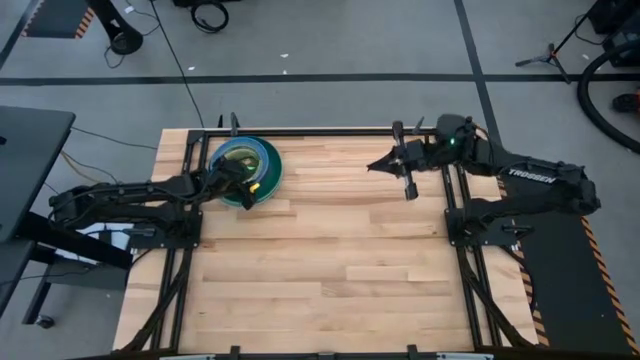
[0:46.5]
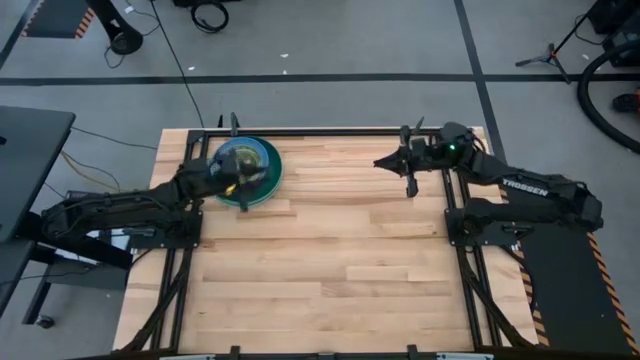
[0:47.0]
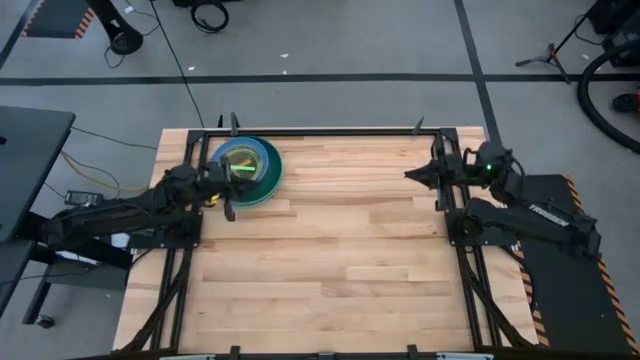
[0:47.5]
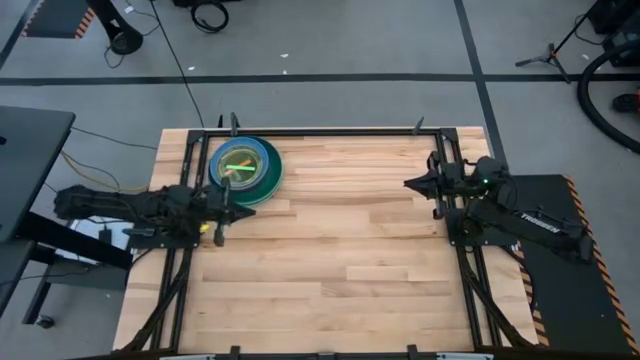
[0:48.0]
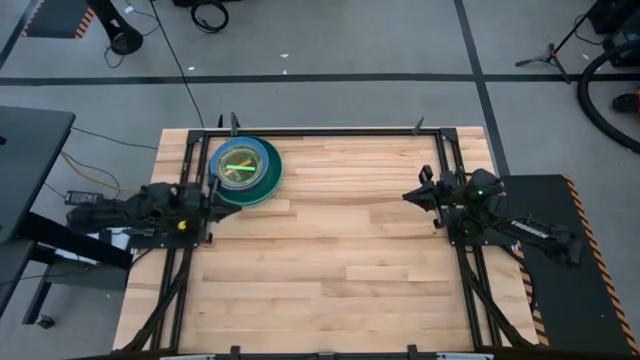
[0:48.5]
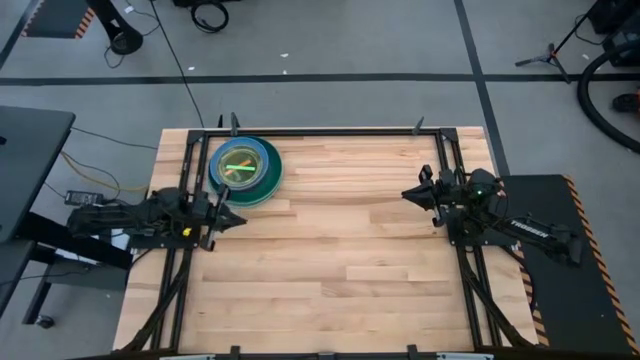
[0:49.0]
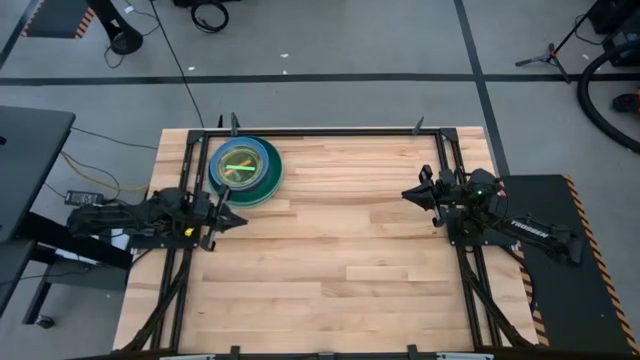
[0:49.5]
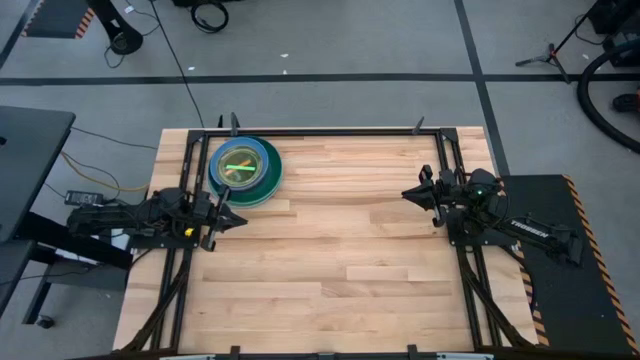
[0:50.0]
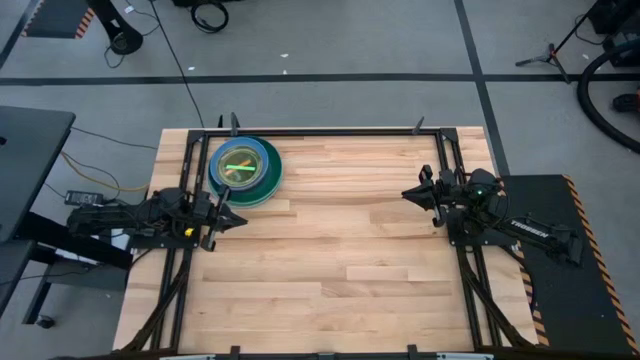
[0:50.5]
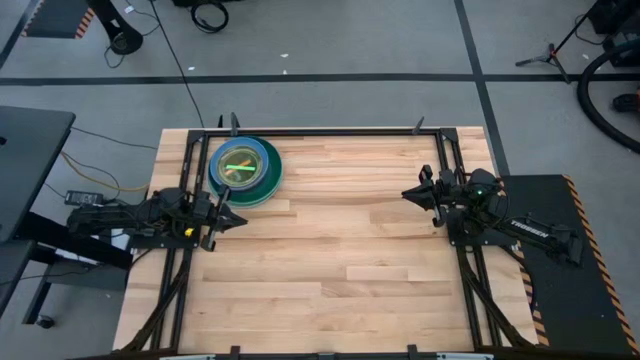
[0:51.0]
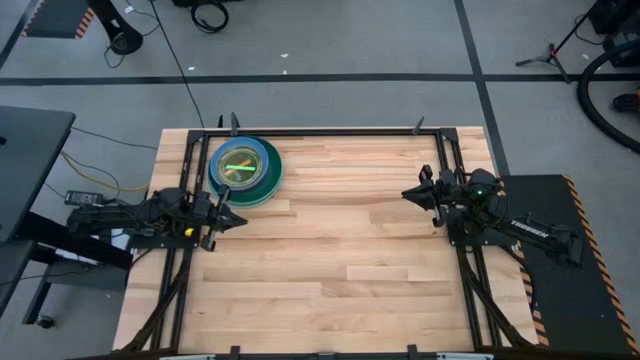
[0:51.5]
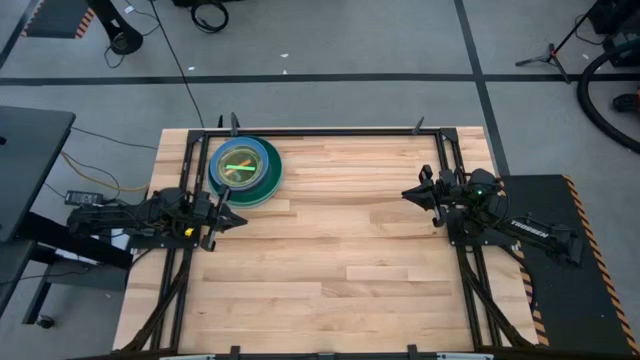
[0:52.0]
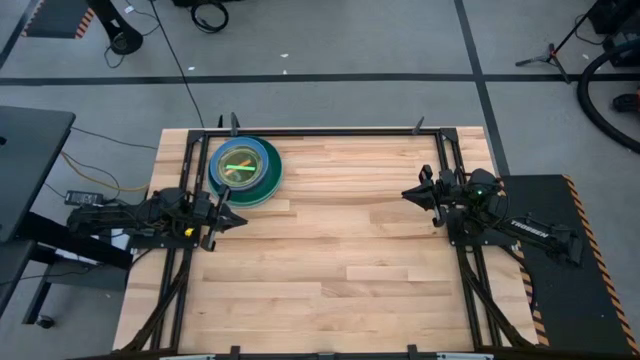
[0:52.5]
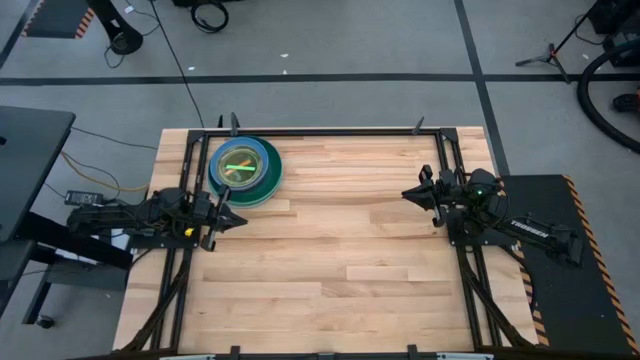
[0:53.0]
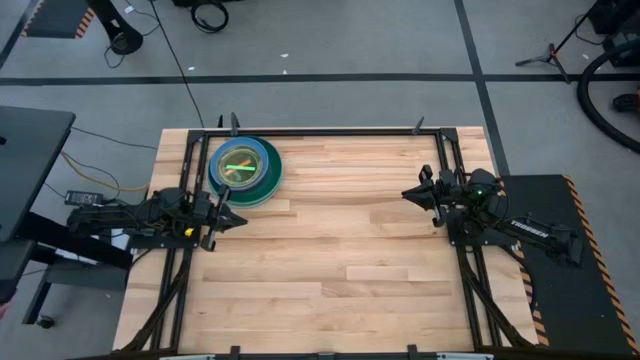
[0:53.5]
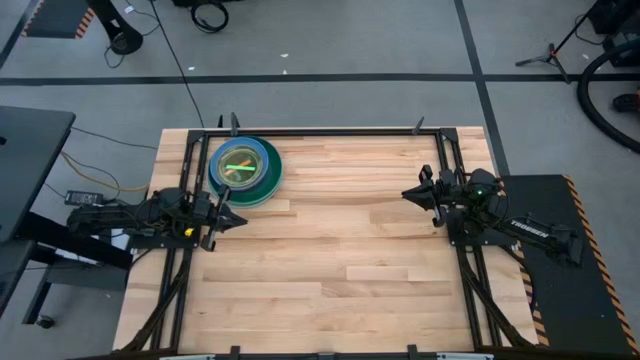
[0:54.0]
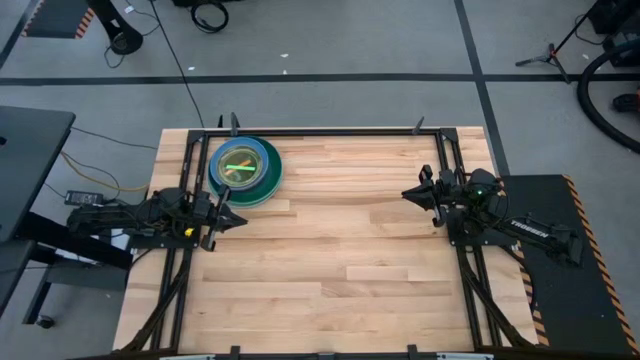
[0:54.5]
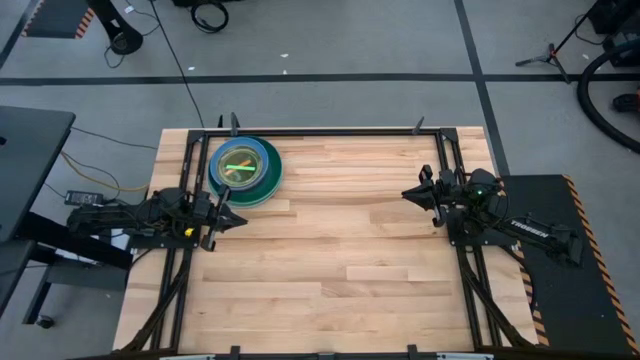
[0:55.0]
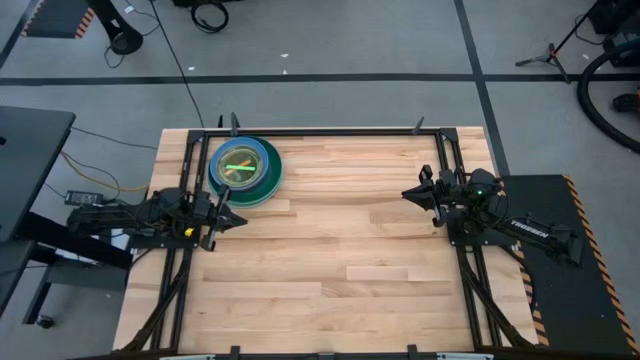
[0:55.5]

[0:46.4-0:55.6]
Task: Stack plastic plates
Return to Home Position

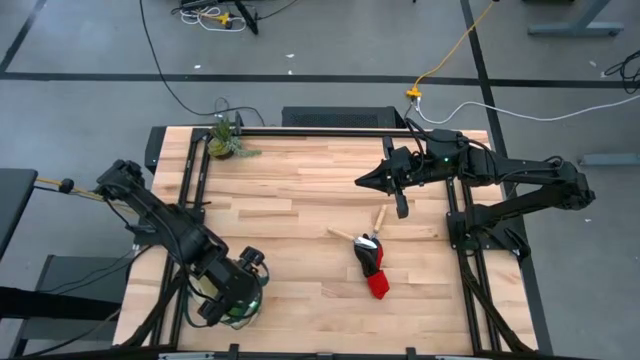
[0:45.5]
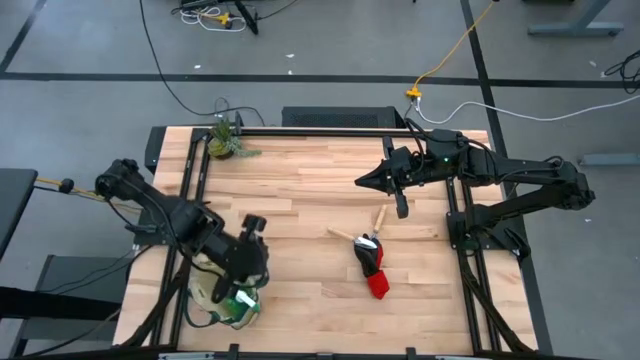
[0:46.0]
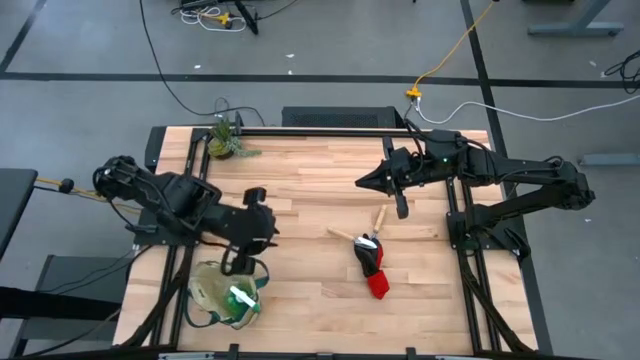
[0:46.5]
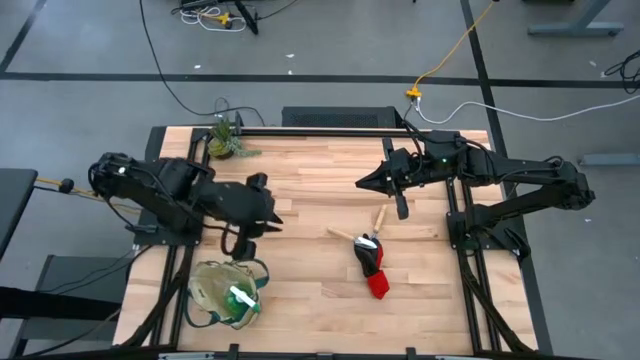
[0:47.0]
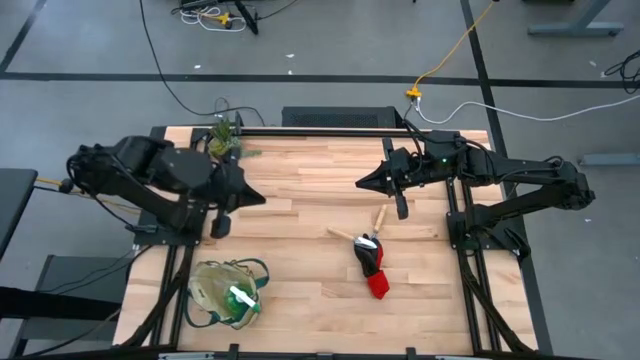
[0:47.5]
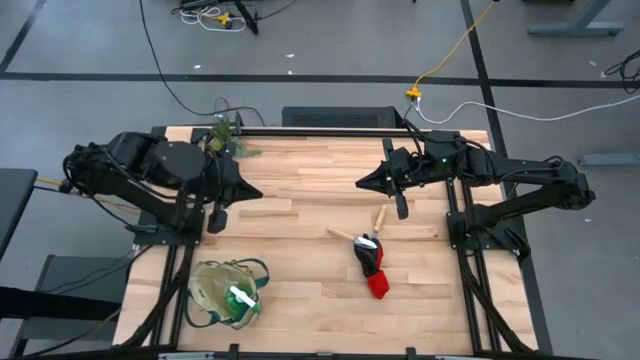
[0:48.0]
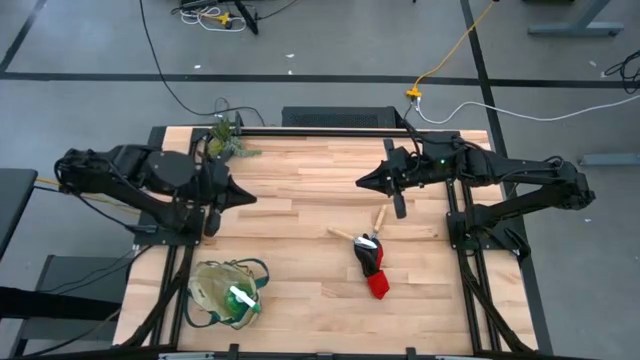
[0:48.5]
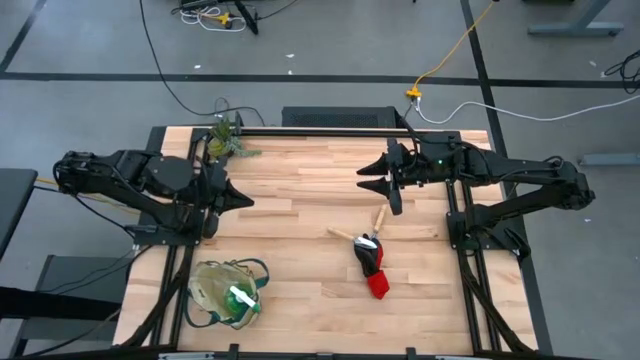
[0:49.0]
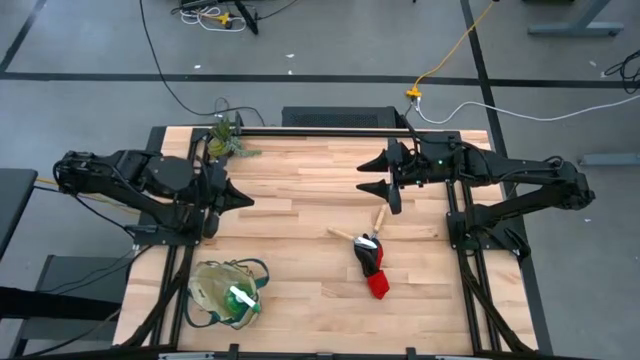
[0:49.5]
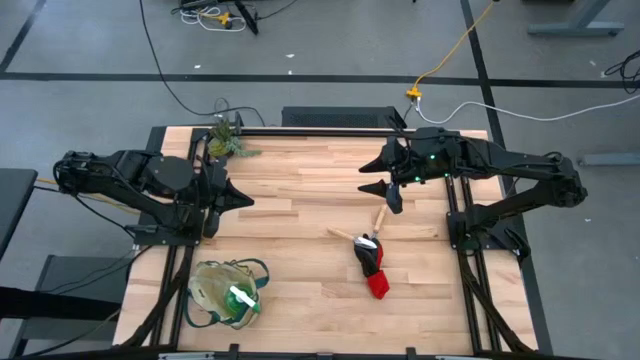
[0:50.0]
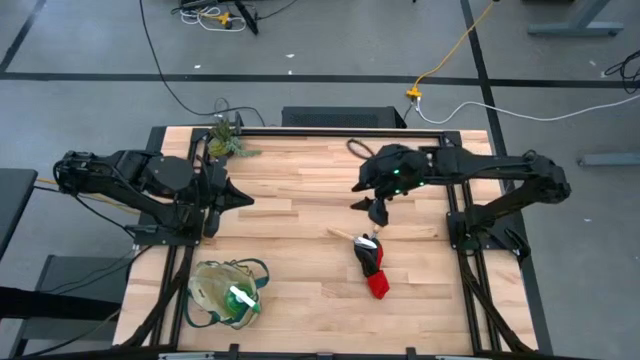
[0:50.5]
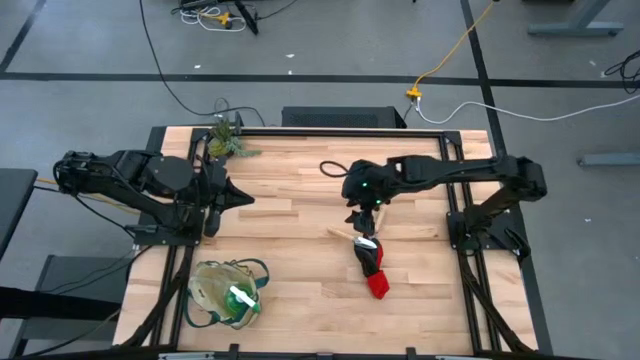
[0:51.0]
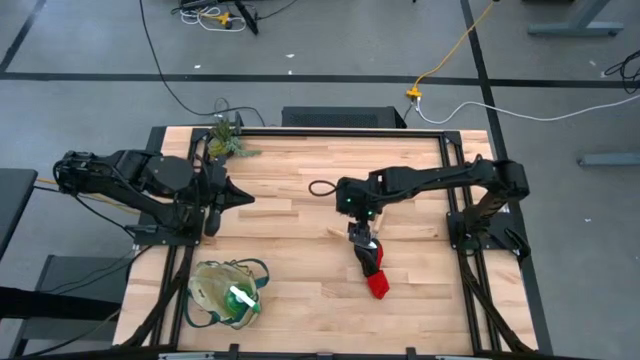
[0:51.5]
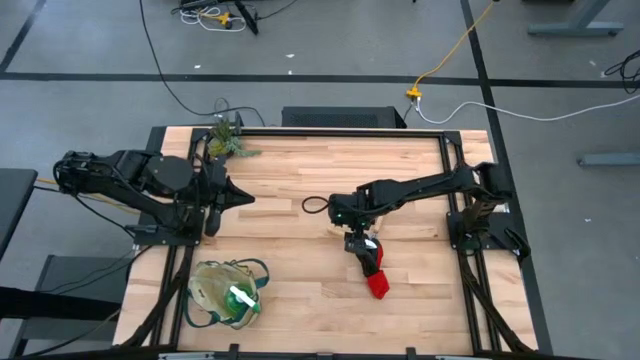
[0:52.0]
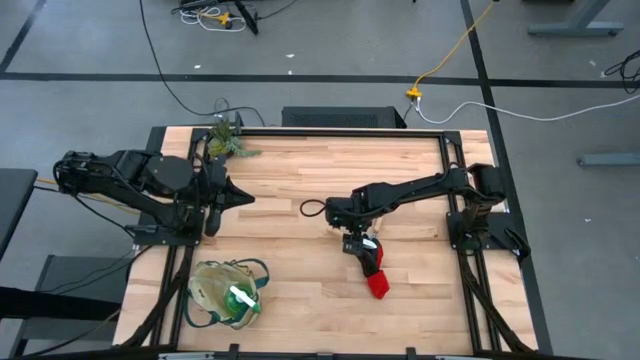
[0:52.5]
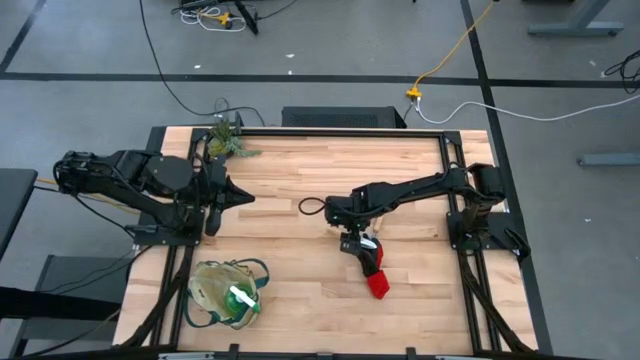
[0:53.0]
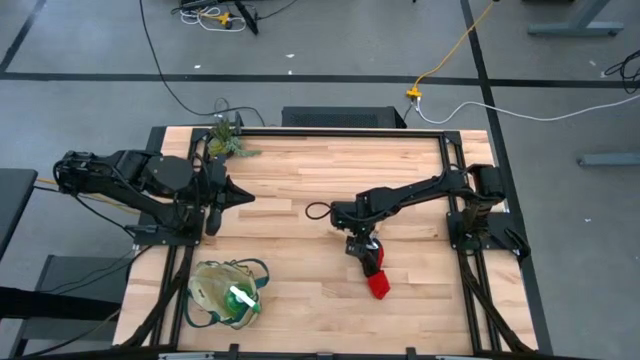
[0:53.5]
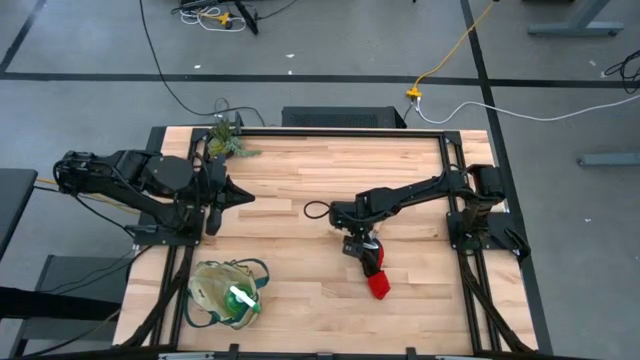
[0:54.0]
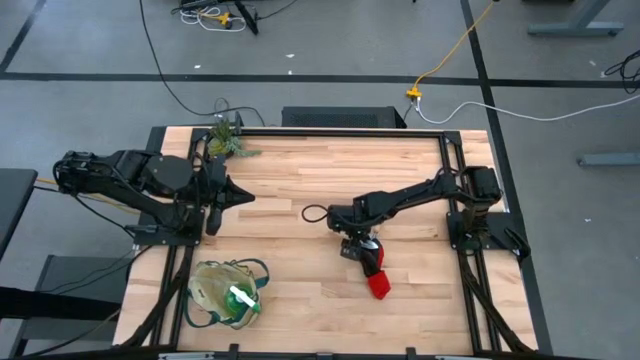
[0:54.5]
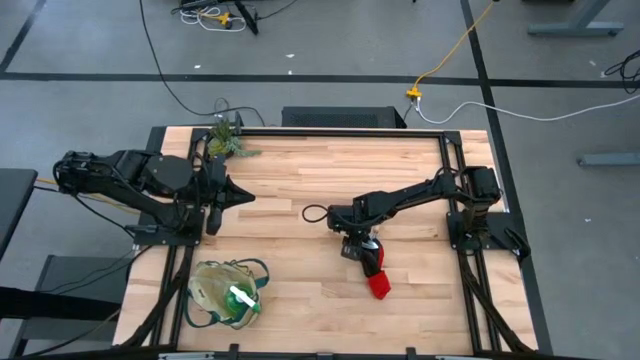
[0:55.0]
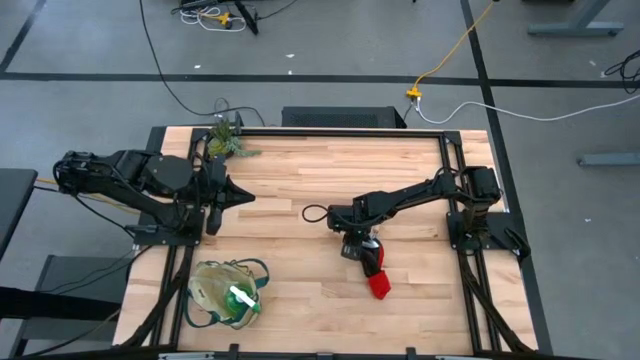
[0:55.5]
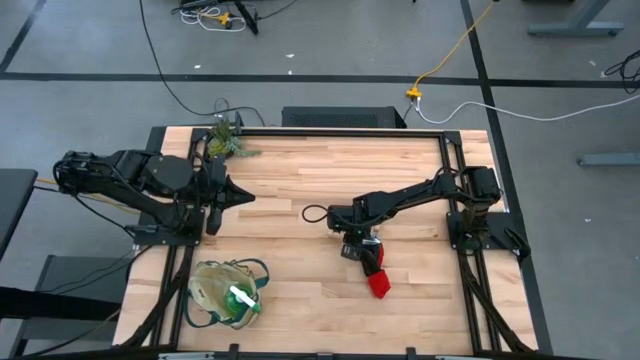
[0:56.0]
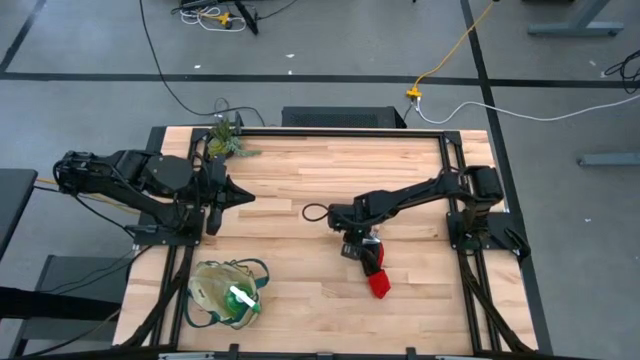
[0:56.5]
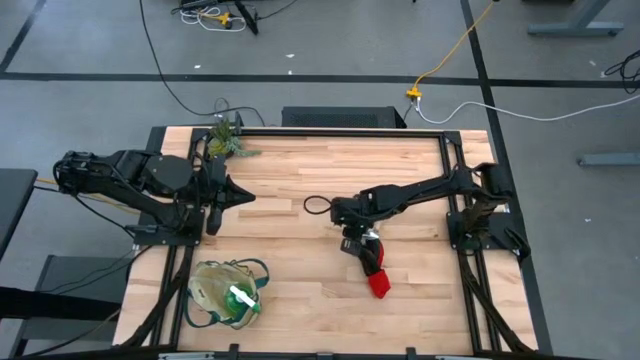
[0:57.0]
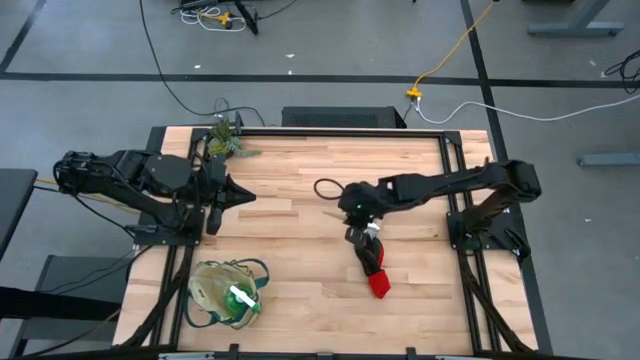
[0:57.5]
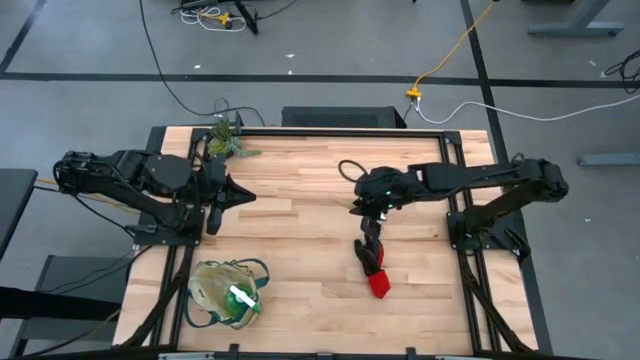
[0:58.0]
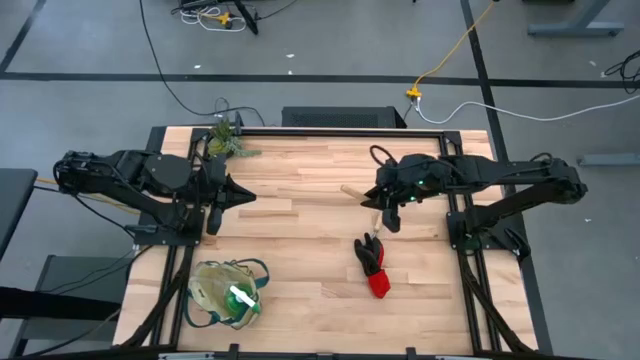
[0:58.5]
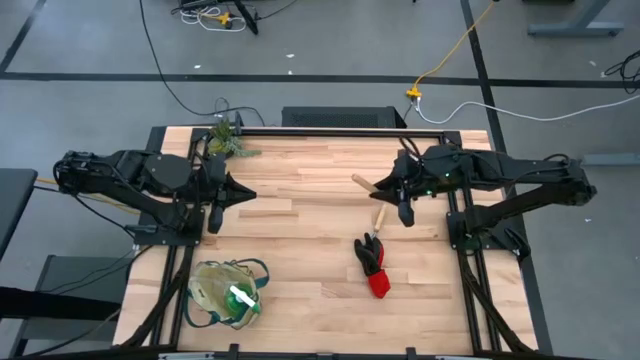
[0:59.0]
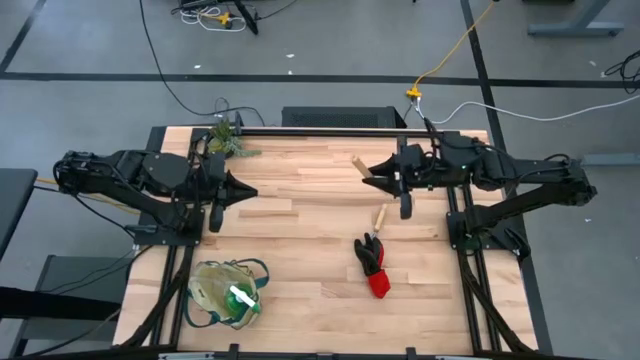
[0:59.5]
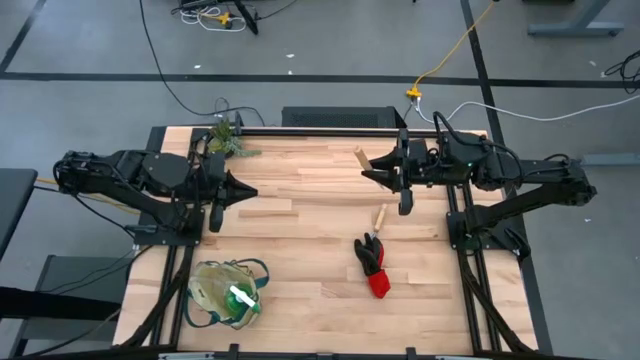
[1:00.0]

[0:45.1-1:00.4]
Task: Pick & Place Garden tools in Gardening bag
Put the brown trowel into the white gardening bag
